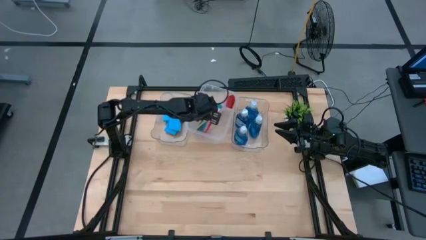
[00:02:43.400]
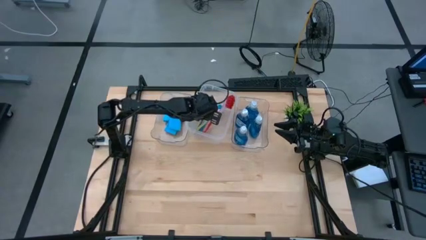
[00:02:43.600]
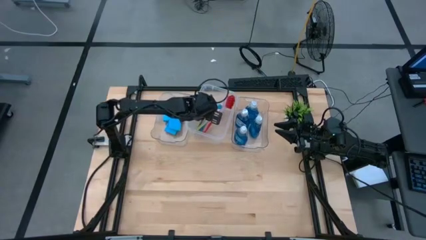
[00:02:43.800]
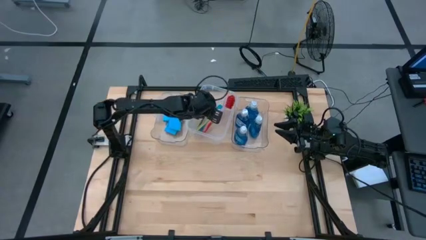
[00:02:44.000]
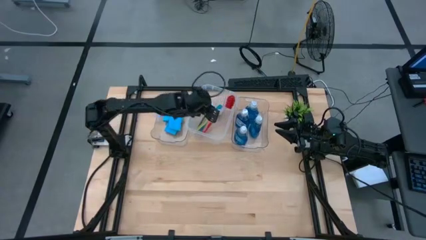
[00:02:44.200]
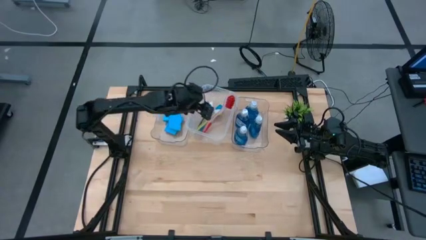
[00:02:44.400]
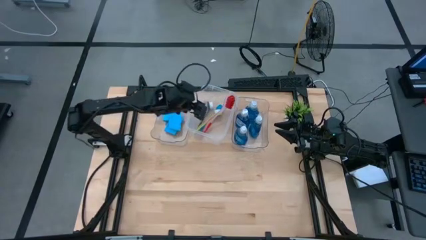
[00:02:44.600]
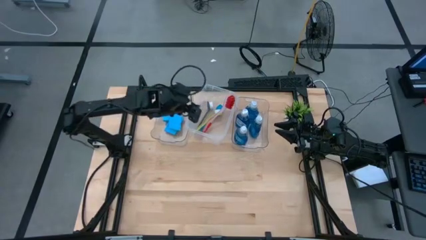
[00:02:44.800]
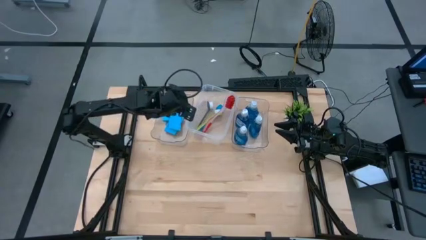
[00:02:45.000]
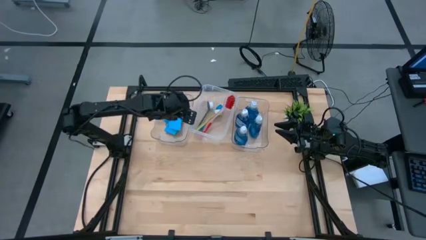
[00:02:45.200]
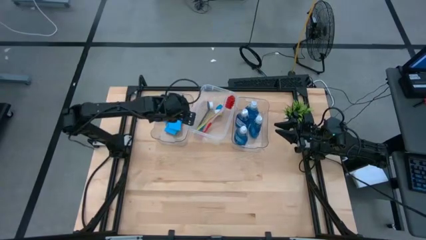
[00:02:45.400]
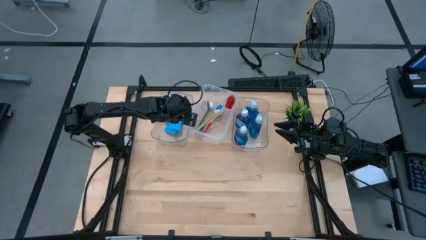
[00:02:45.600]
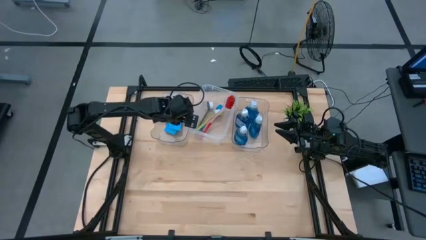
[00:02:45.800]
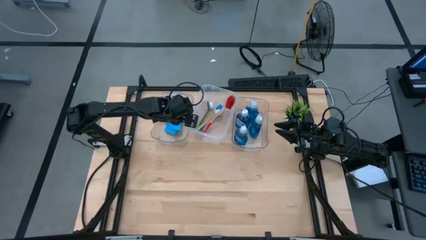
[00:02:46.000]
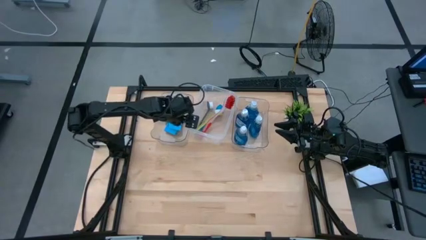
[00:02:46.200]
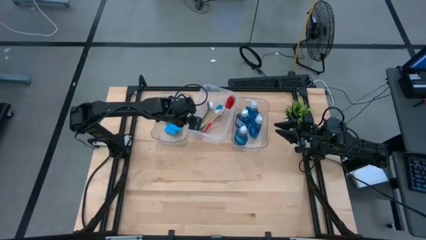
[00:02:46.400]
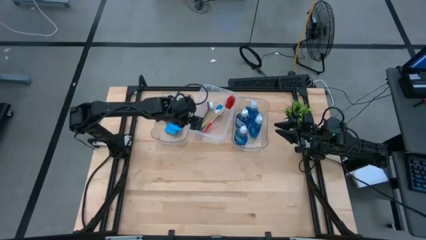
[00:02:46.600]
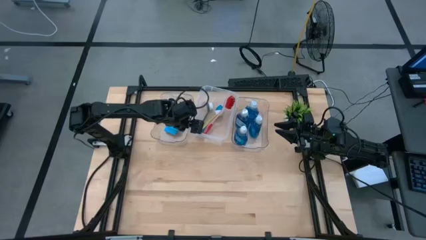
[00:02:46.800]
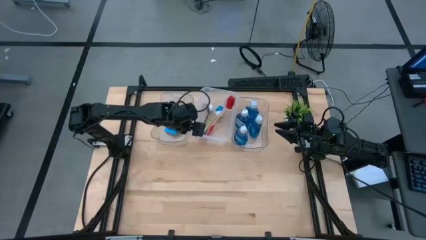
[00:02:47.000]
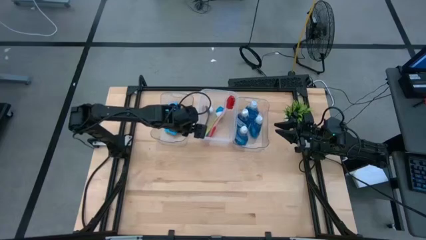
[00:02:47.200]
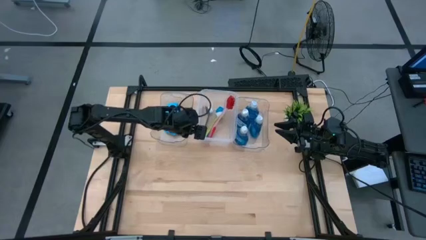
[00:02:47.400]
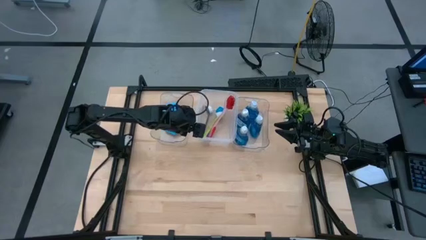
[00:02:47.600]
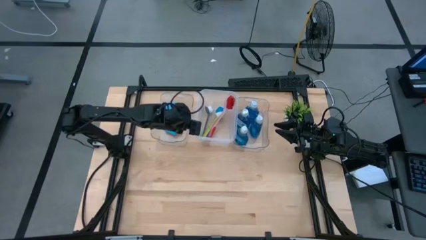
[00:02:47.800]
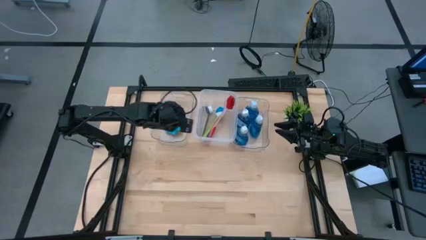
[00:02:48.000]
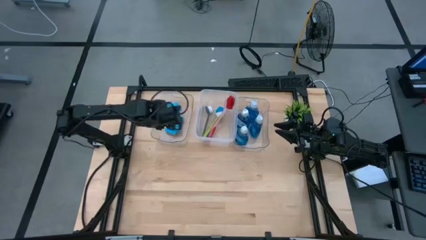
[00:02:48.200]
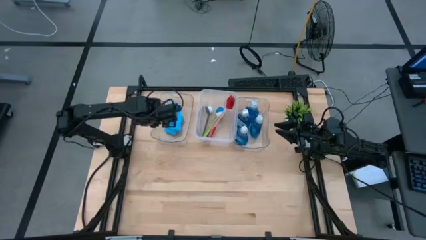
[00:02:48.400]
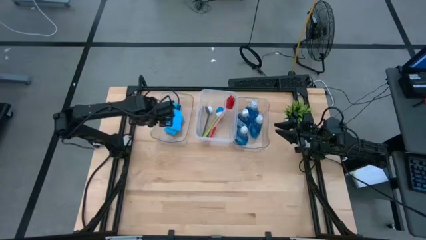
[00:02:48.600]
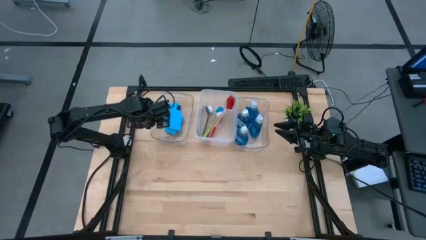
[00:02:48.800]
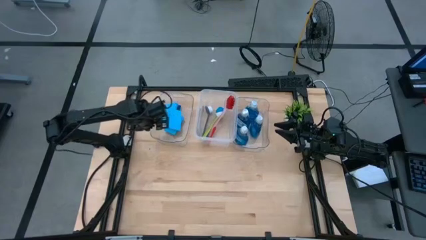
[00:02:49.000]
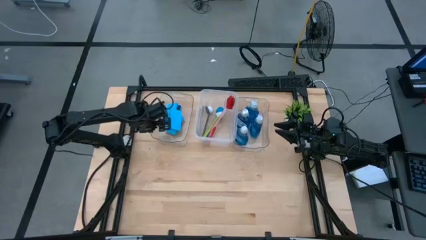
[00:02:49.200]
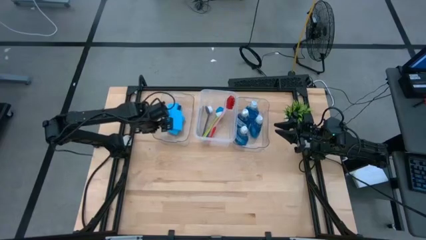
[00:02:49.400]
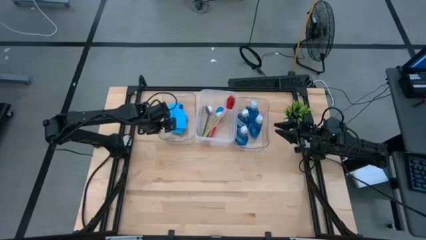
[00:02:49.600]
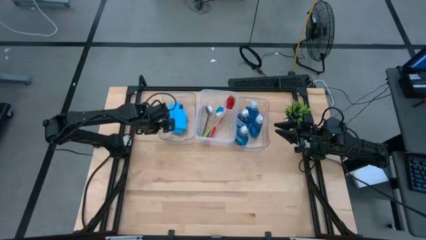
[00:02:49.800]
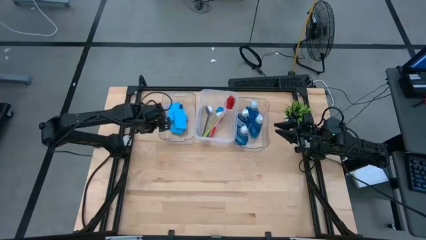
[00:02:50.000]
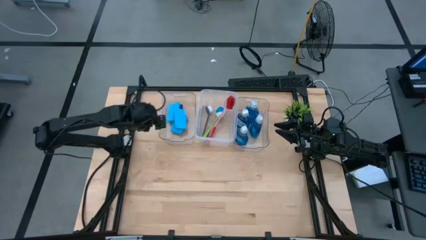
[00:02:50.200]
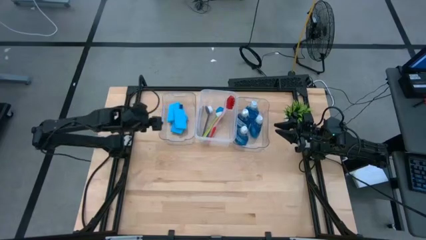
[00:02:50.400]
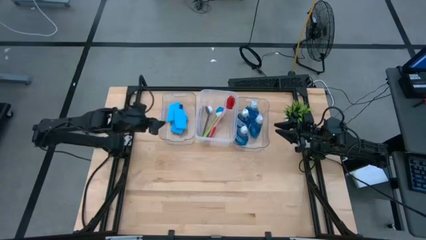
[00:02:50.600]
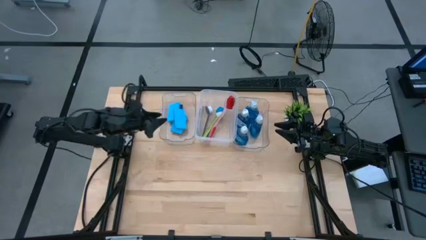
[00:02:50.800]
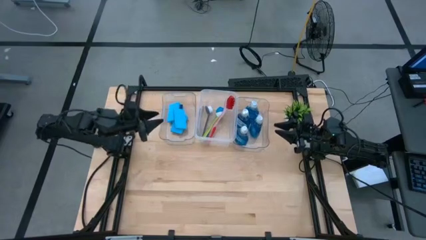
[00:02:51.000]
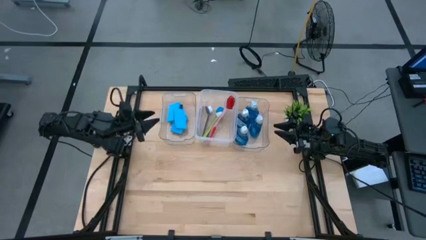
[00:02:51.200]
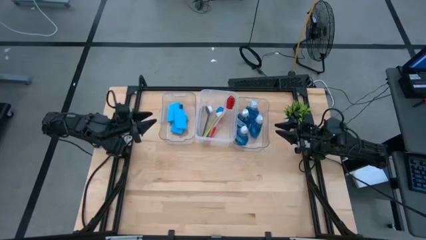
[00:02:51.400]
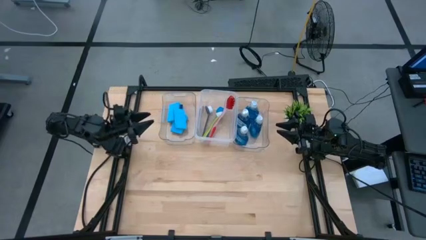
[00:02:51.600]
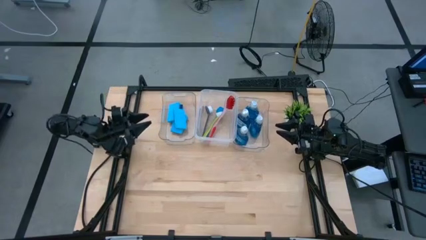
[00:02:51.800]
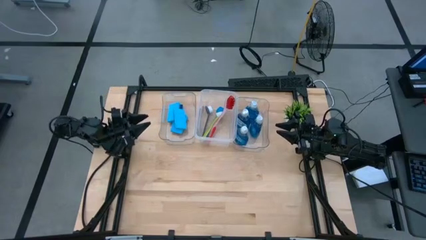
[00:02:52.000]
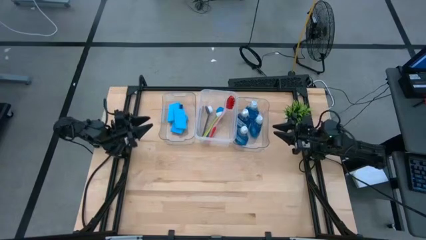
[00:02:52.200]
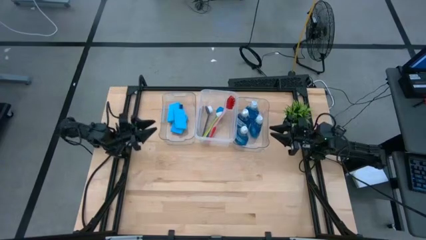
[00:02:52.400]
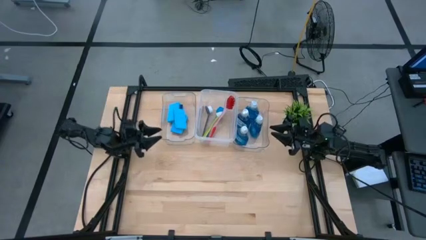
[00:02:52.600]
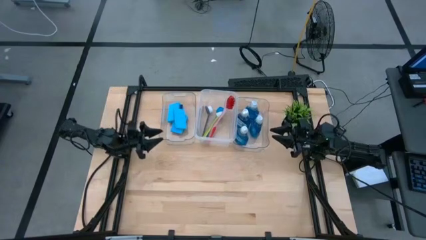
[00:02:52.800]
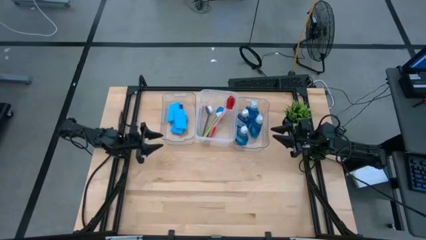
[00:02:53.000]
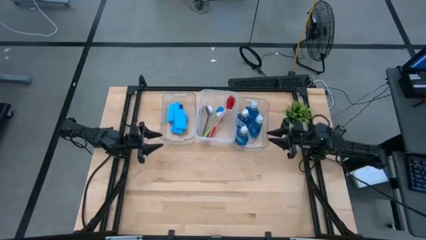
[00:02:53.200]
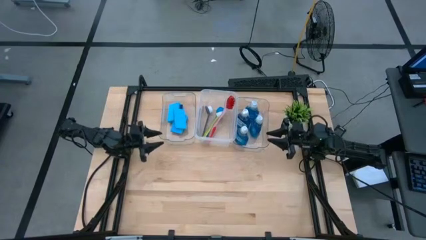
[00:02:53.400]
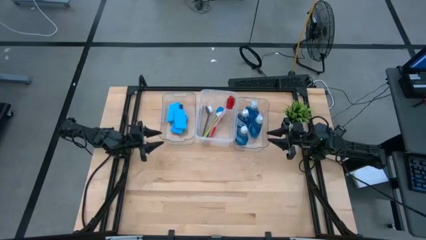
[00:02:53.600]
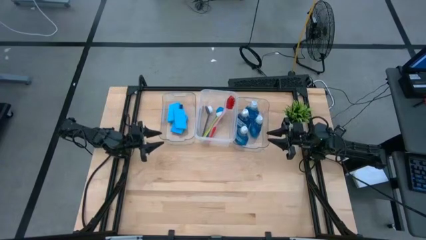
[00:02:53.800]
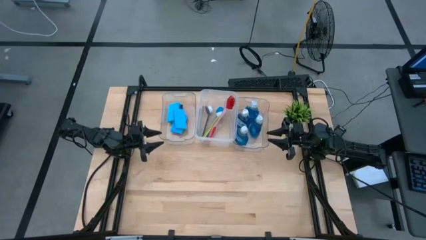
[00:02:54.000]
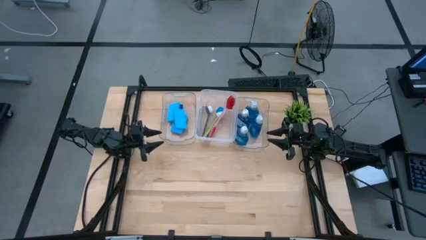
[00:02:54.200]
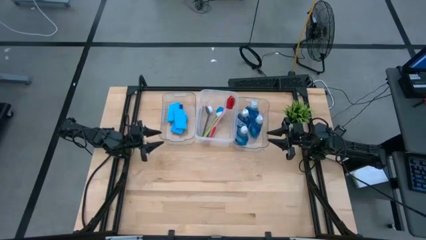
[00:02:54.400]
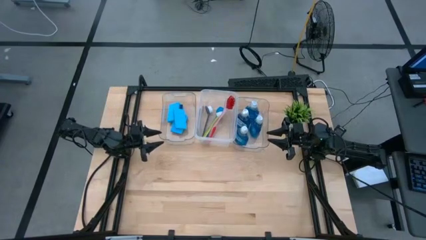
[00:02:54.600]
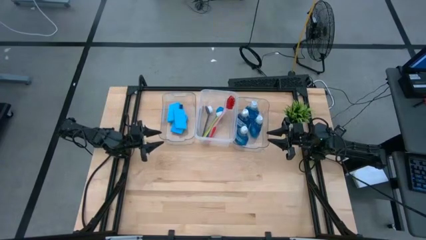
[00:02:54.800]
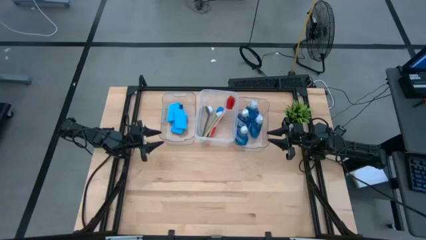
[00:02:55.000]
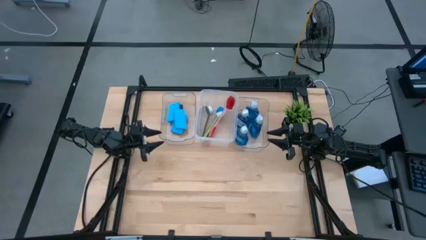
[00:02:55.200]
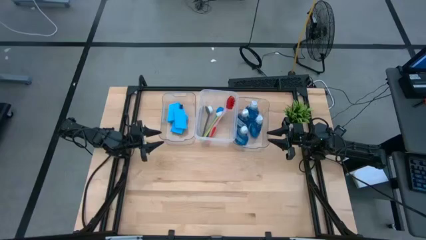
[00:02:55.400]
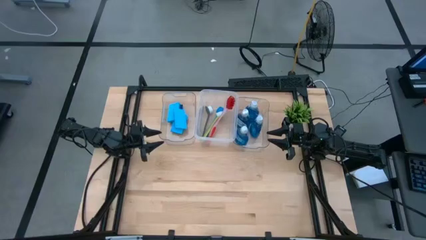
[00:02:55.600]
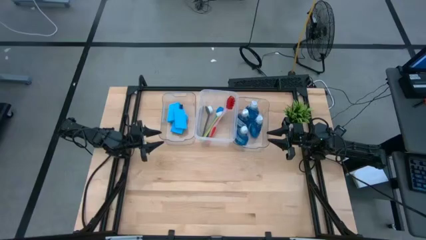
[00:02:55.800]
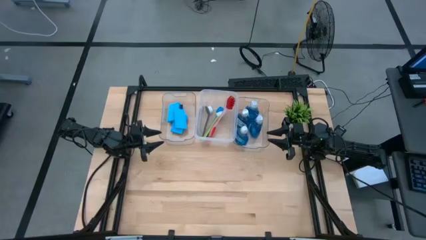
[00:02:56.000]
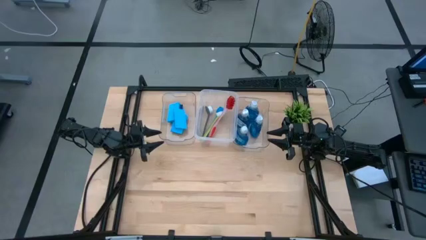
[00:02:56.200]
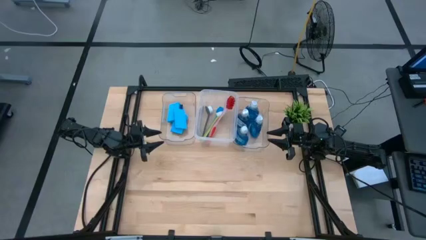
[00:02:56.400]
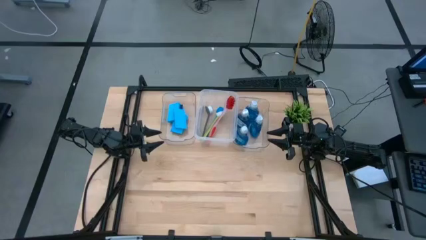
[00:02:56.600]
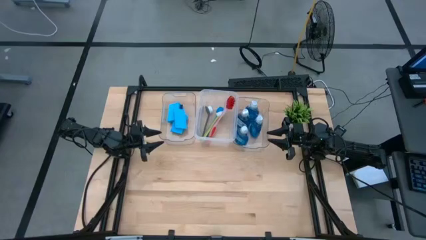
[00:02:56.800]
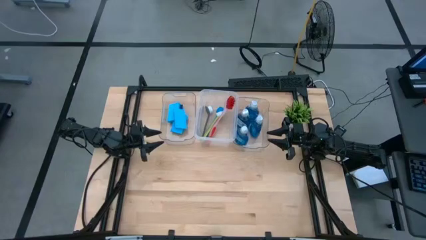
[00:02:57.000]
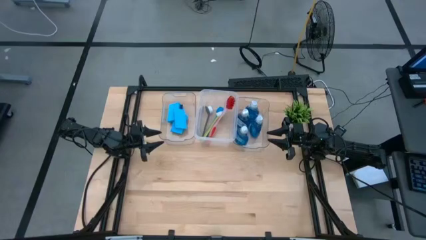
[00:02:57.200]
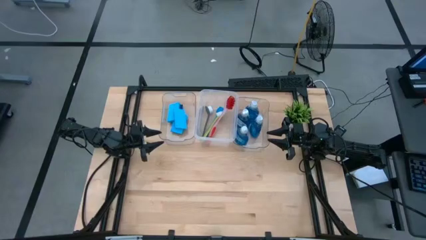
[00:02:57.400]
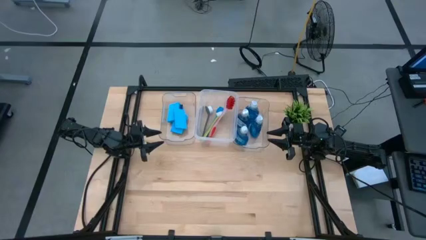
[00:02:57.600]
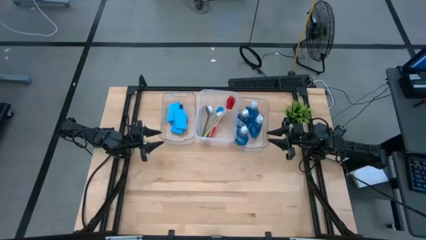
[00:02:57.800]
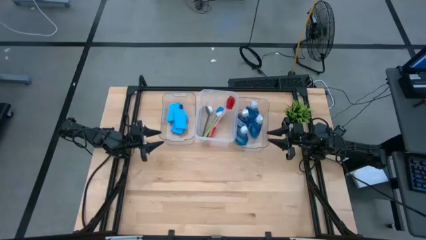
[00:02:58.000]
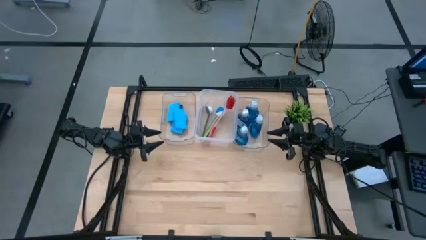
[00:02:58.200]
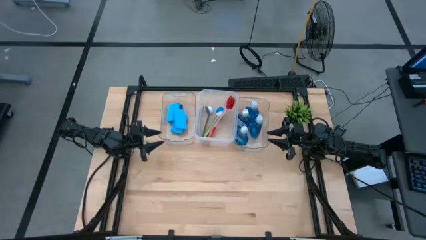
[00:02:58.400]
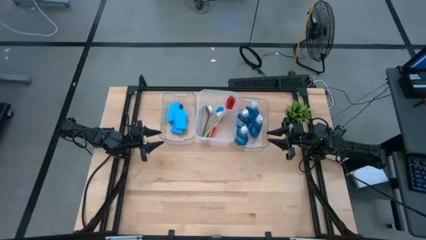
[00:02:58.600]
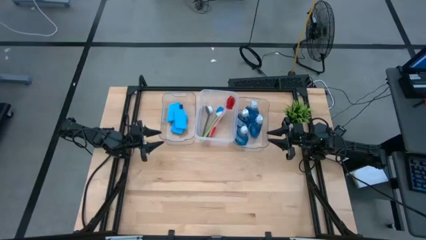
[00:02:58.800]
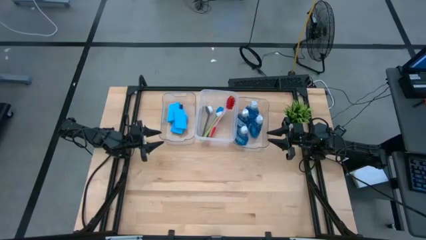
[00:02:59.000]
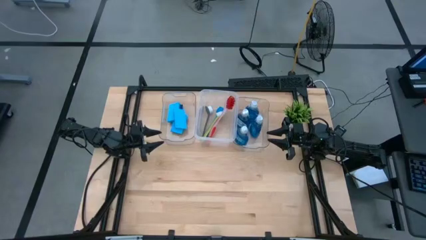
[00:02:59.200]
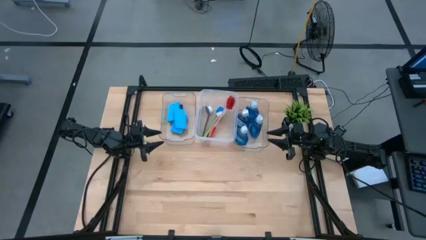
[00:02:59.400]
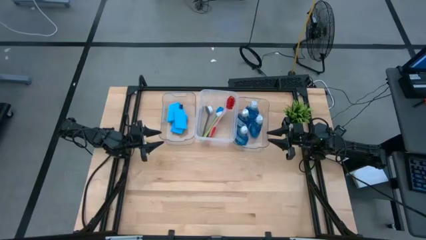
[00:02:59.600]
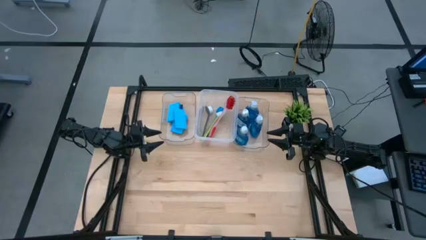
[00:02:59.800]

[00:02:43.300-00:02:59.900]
Task: Pick & Place Kitchen Sink Supplies
Return to Home Position
